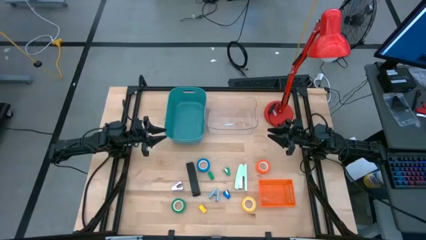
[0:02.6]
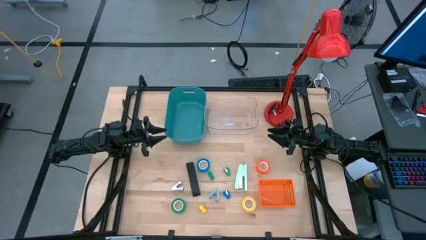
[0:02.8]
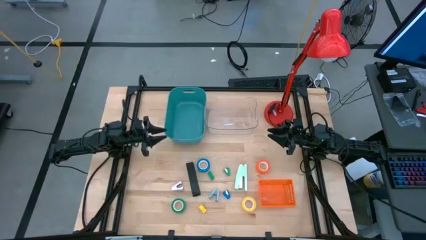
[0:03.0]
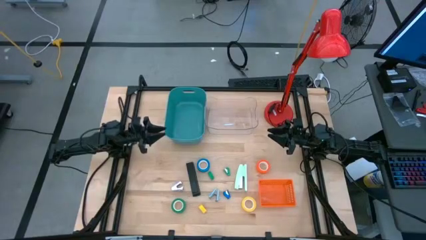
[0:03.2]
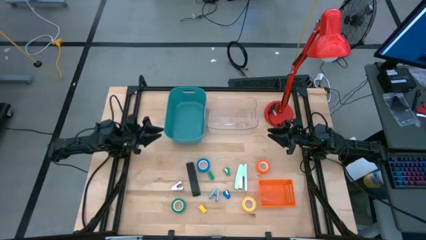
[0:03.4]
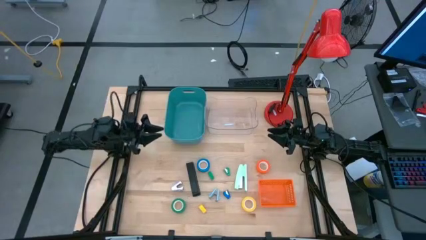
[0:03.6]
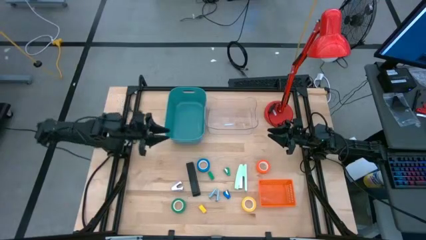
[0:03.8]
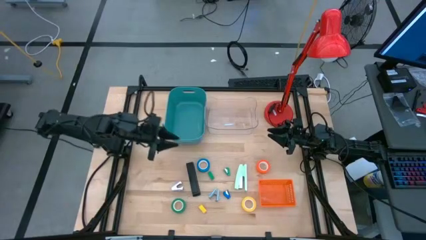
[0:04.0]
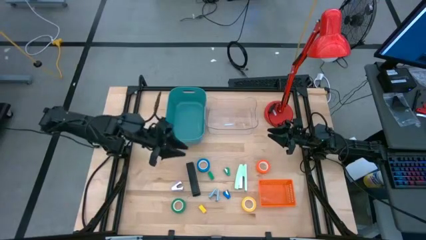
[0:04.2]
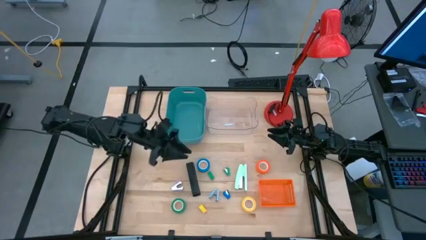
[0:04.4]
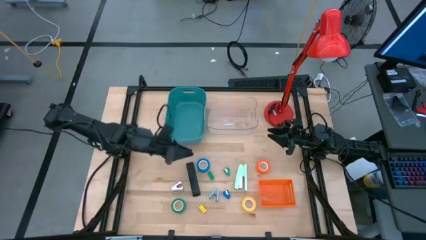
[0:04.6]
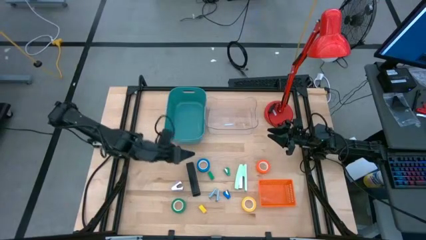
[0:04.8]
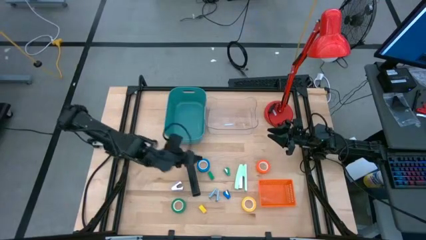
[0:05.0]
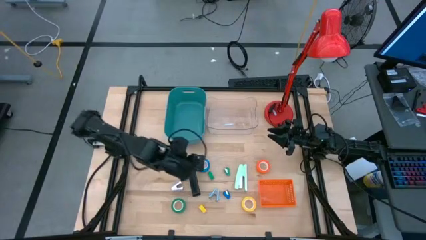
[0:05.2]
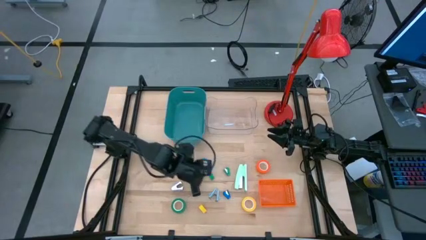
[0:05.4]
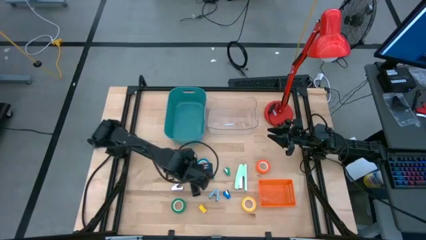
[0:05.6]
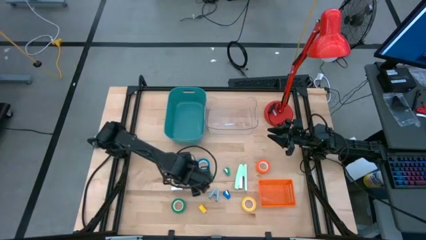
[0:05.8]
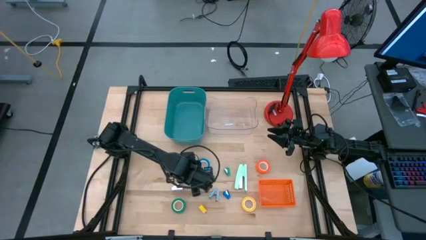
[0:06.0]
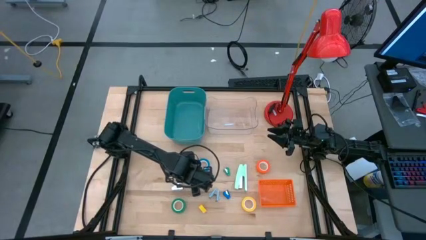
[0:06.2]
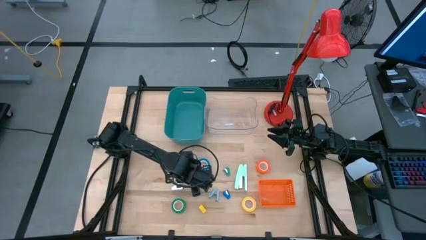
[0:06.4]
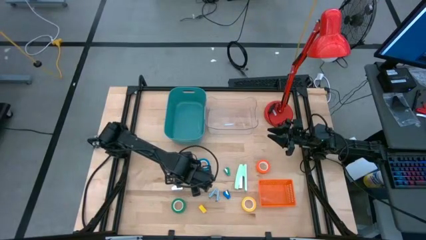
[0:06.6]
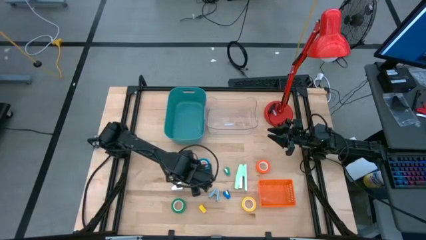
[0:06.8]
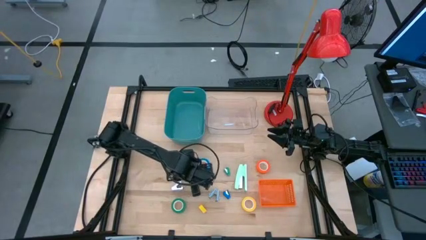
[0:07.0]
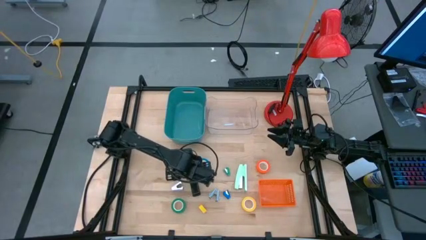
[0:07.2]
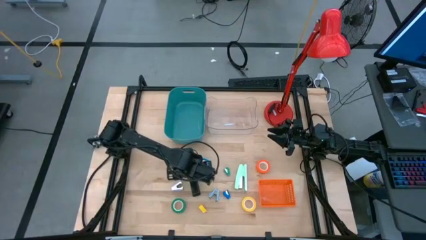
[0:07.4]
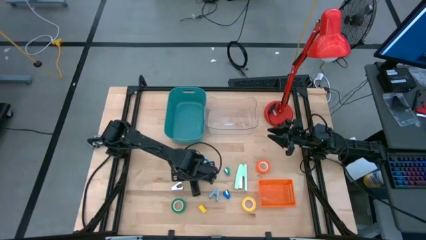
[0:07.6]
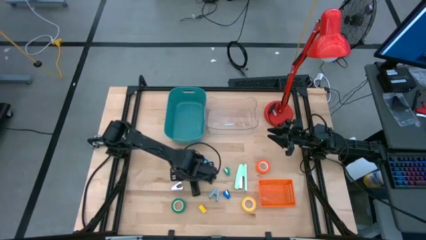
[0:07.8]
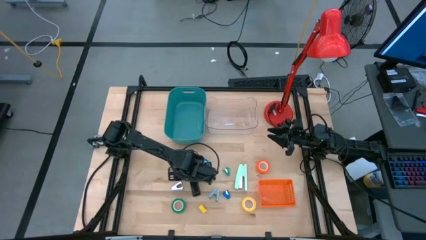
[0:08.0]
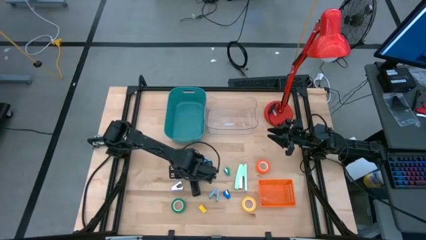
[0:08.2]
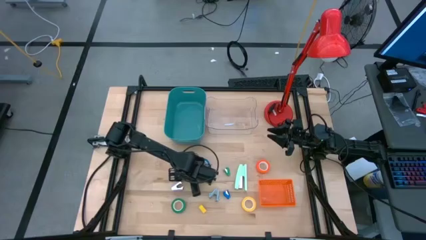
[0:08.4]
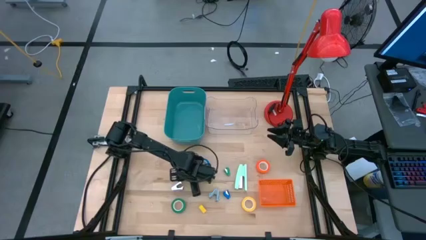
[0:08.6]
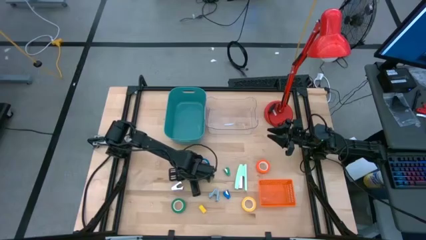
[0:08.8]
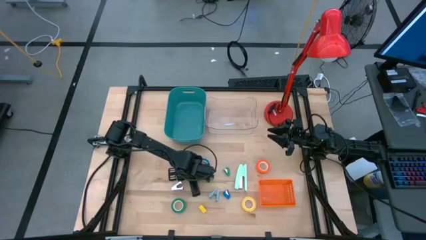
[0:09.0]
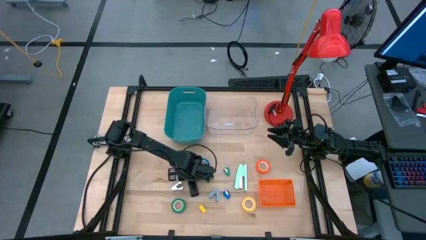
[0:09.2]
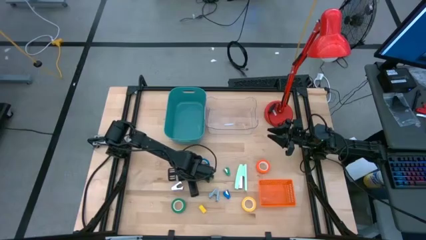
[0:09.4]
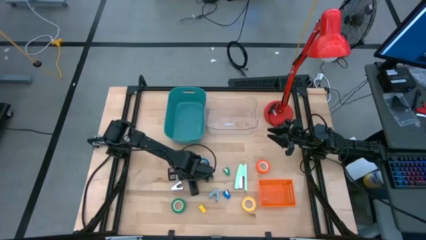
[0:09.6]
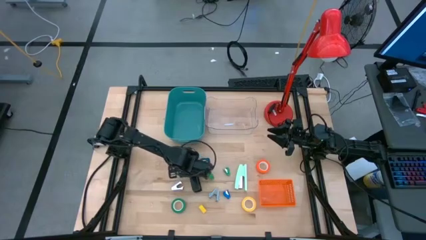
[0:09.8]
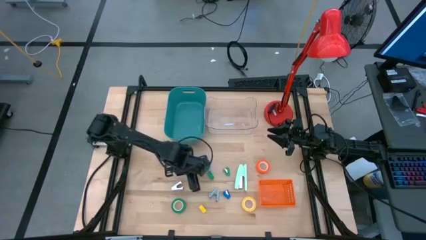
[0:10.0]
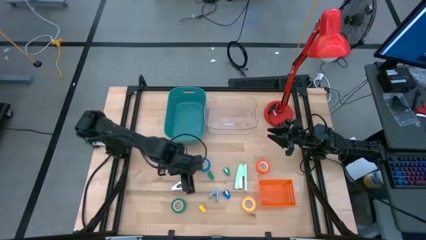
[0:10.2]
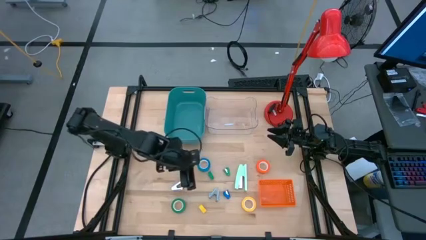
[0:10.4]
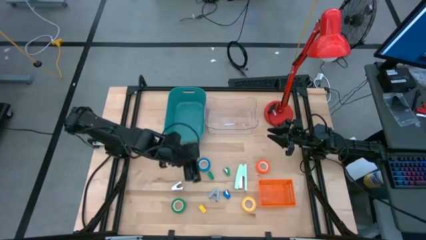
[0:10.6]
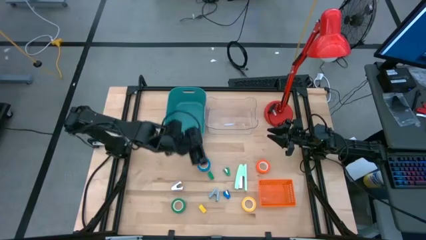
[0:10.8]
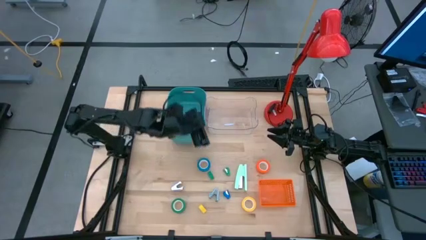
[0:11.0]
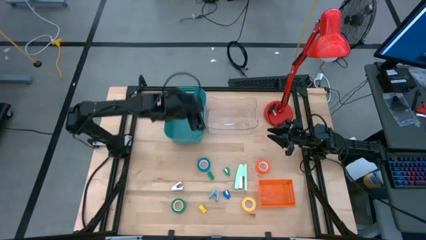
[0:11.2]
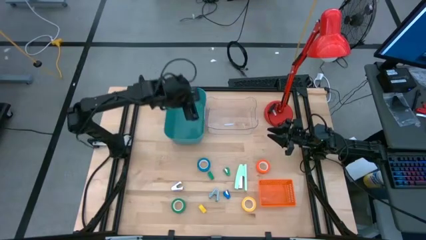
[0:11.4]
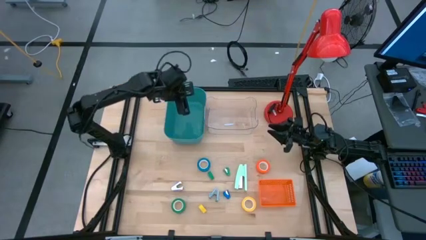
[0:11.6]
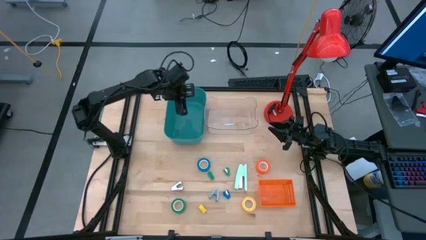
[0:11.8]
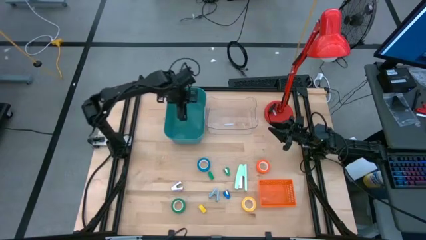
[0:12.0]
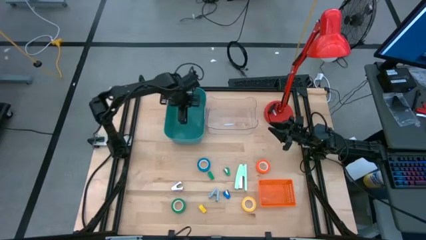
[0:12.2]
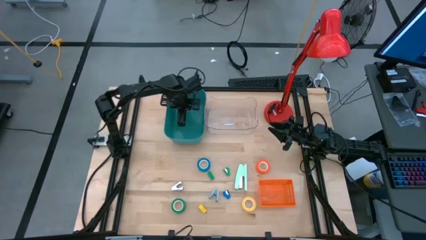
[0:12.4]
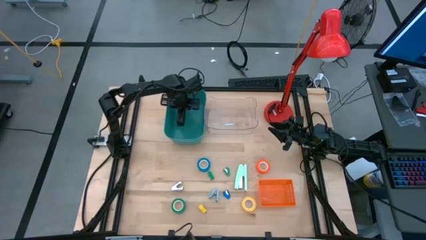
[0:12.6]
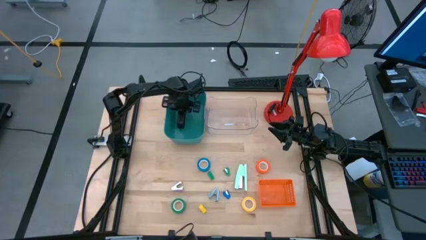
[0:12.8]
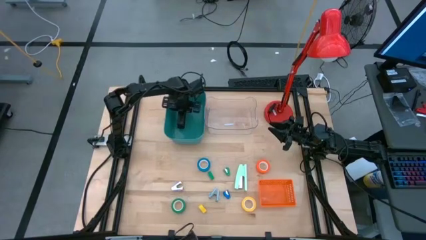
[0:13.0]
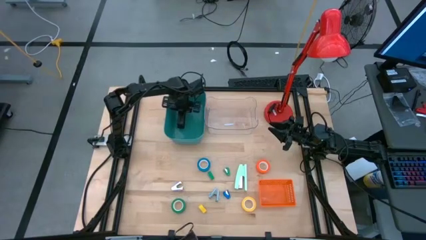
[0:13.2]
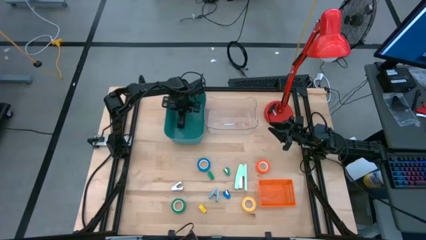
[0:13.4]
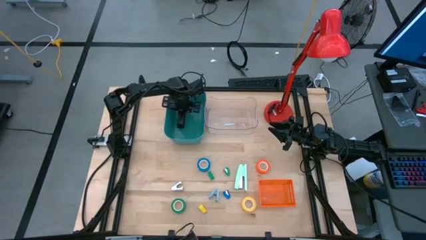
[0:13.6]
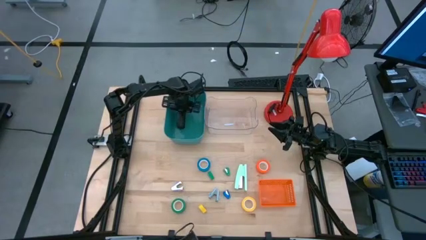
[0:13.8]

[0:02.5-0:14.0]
Task: Pick and place Stapler, Stapler remover, tape
Put the black stapler into the blue bin
